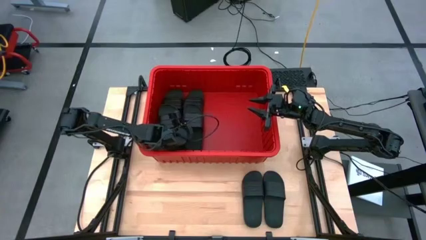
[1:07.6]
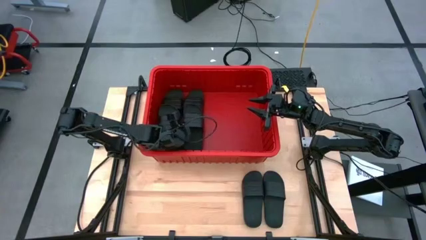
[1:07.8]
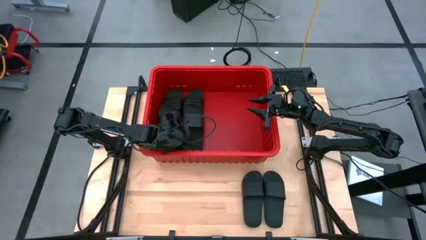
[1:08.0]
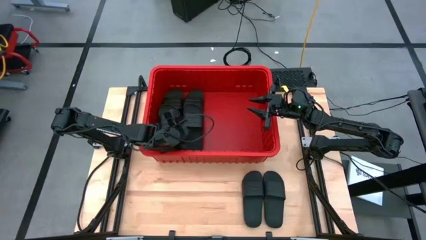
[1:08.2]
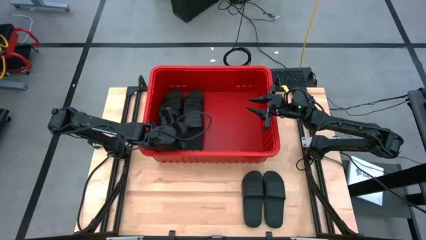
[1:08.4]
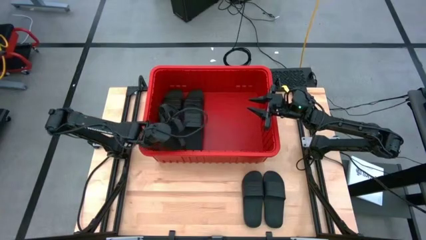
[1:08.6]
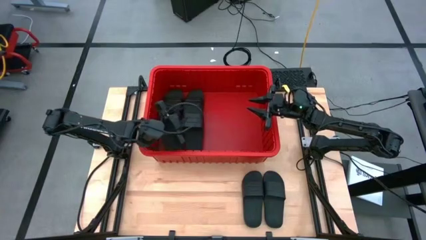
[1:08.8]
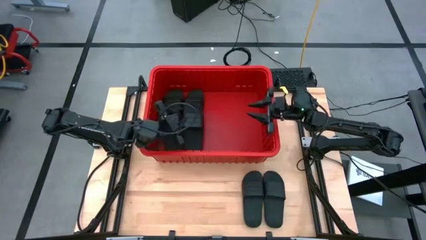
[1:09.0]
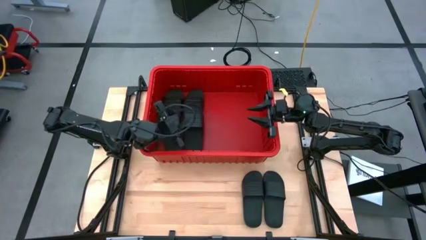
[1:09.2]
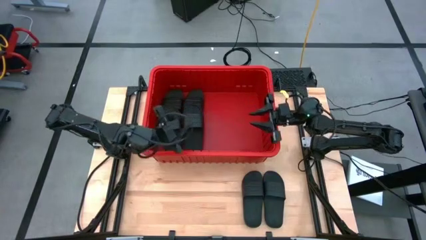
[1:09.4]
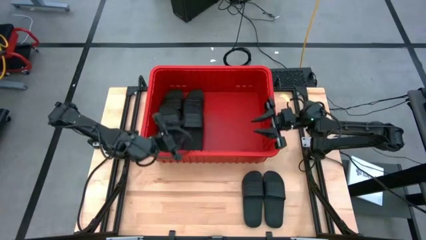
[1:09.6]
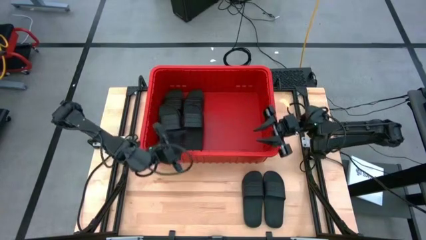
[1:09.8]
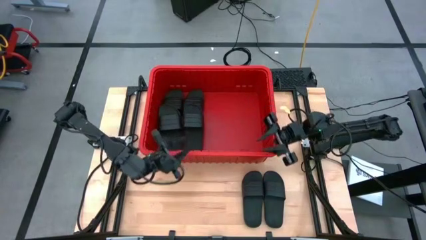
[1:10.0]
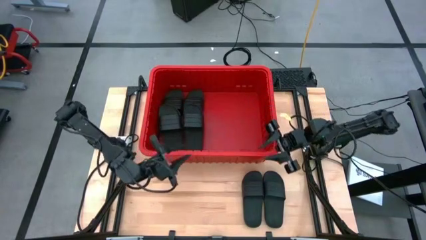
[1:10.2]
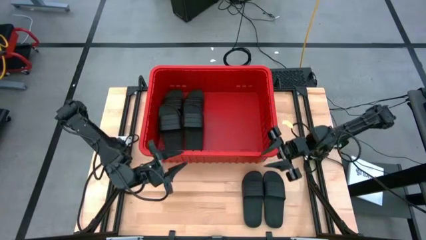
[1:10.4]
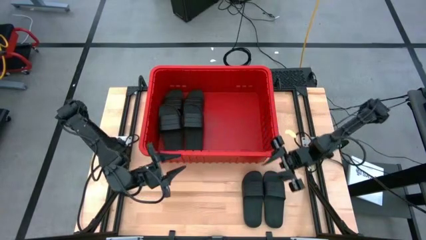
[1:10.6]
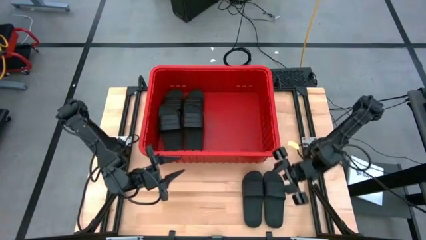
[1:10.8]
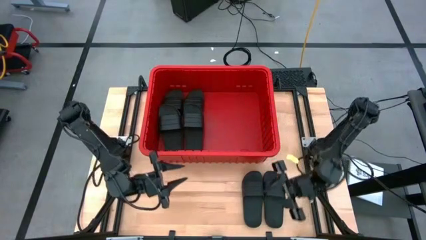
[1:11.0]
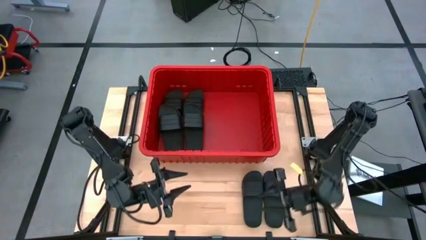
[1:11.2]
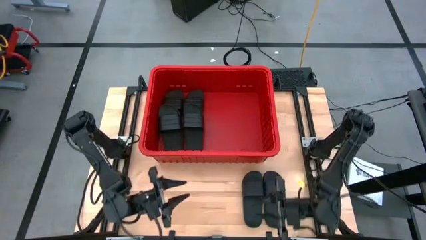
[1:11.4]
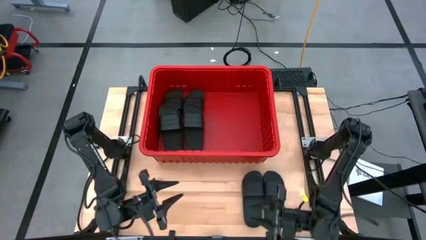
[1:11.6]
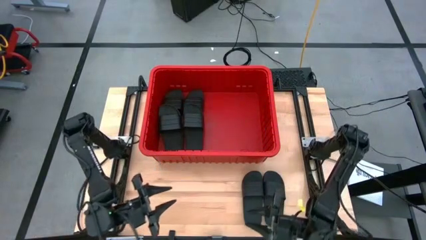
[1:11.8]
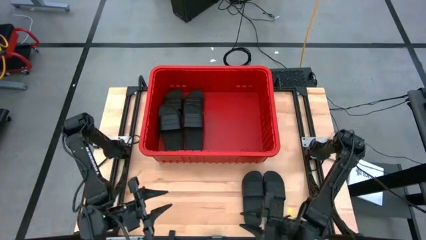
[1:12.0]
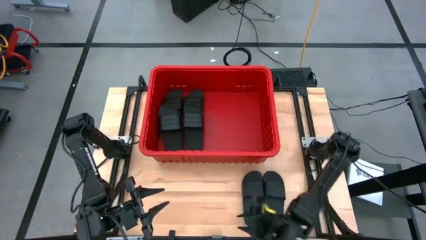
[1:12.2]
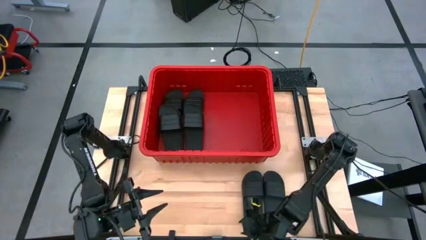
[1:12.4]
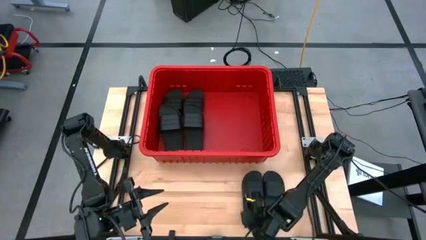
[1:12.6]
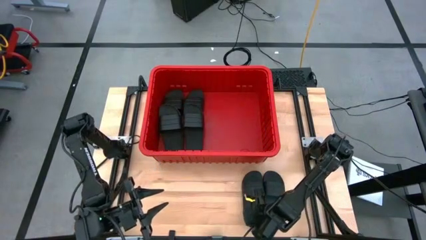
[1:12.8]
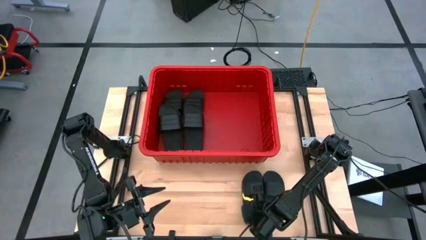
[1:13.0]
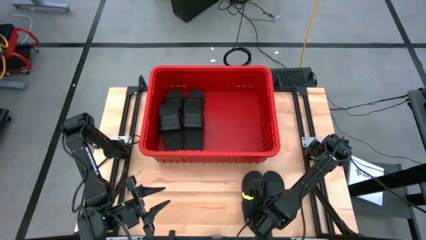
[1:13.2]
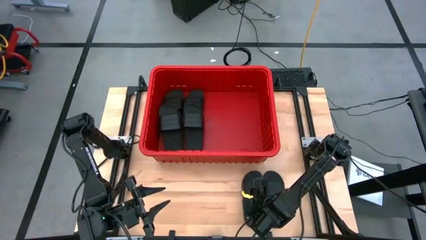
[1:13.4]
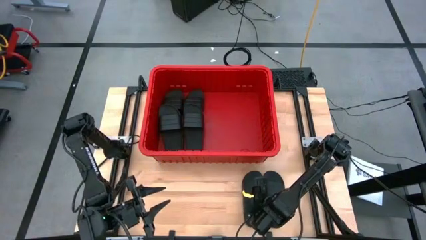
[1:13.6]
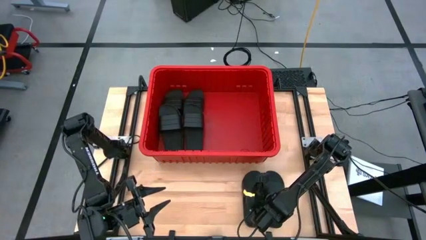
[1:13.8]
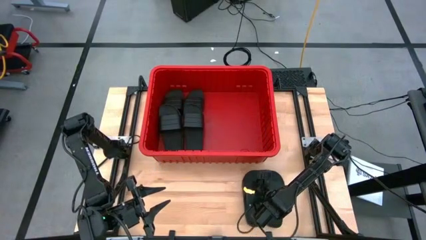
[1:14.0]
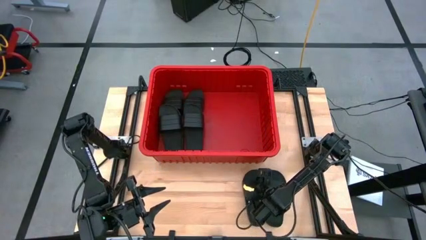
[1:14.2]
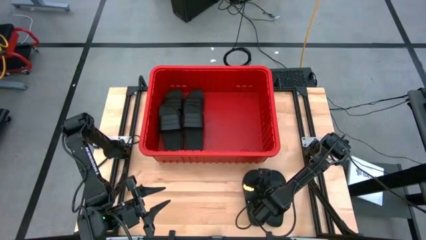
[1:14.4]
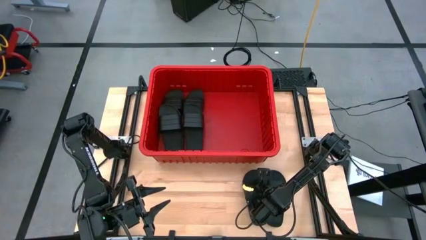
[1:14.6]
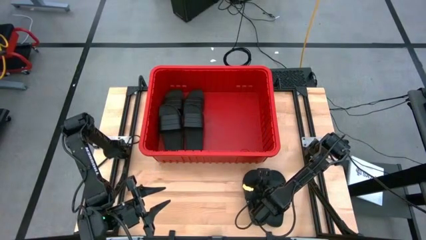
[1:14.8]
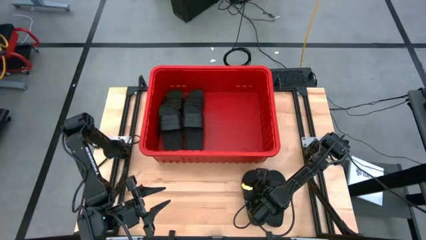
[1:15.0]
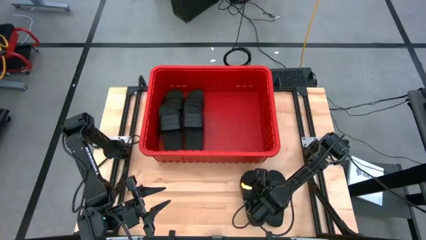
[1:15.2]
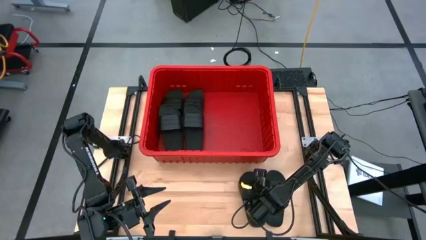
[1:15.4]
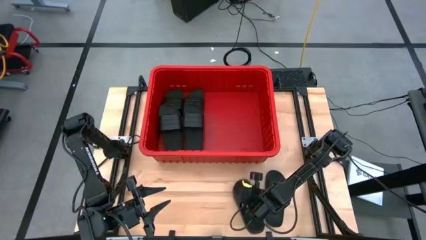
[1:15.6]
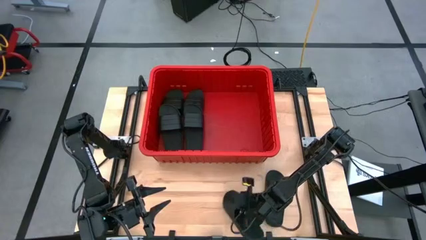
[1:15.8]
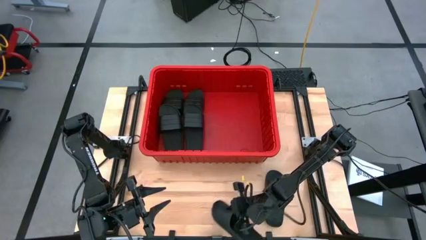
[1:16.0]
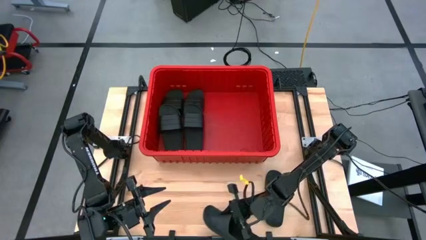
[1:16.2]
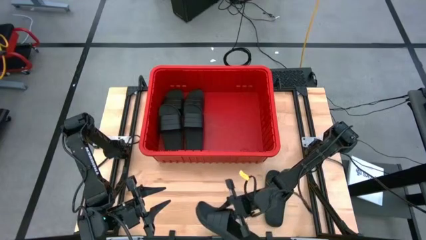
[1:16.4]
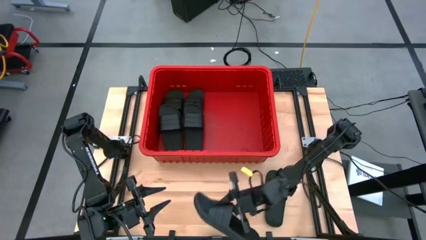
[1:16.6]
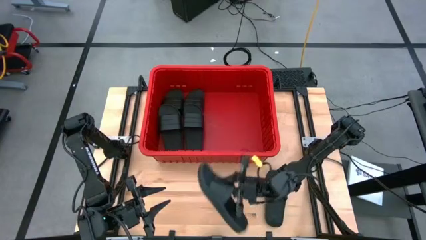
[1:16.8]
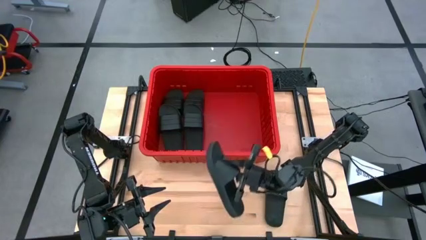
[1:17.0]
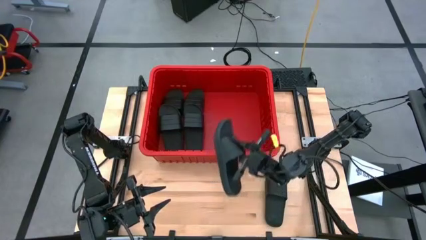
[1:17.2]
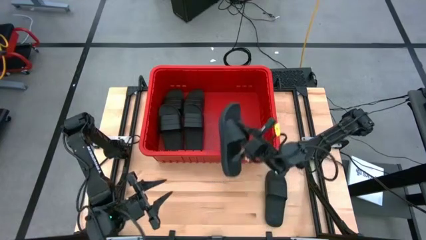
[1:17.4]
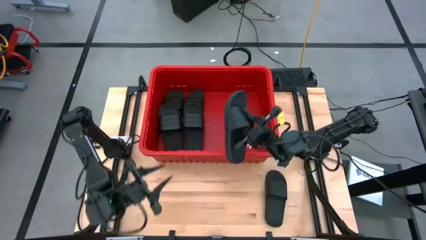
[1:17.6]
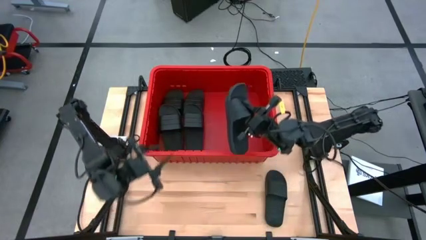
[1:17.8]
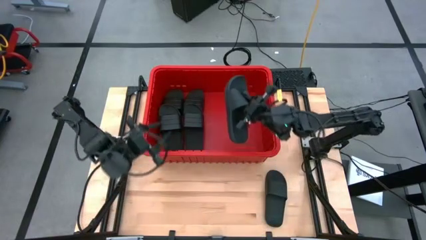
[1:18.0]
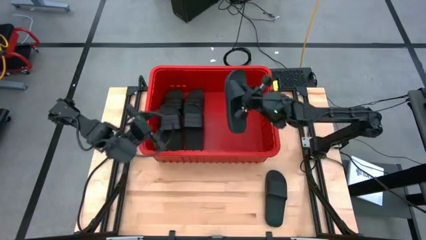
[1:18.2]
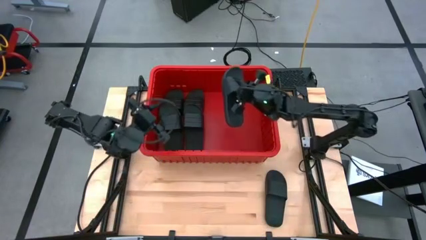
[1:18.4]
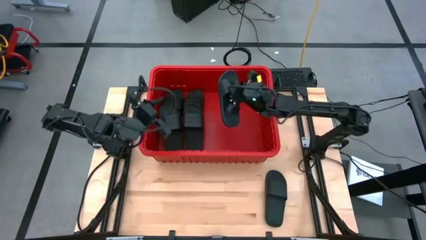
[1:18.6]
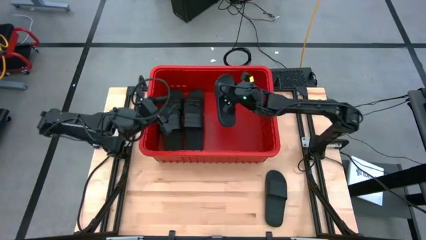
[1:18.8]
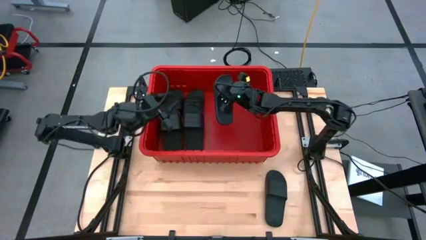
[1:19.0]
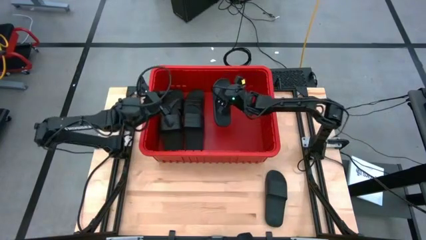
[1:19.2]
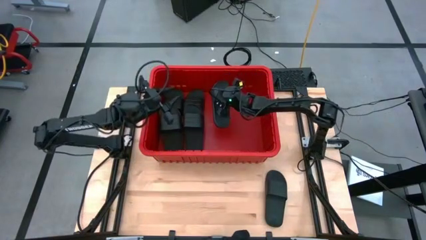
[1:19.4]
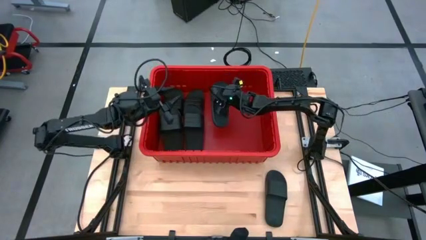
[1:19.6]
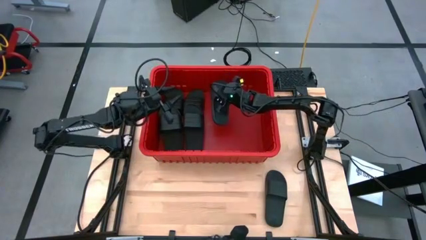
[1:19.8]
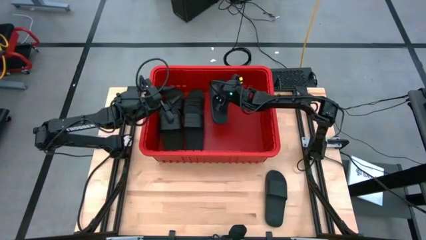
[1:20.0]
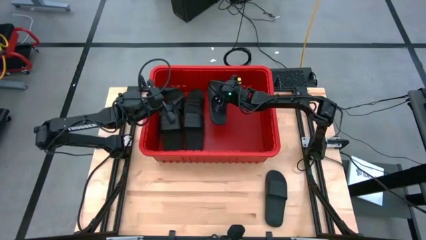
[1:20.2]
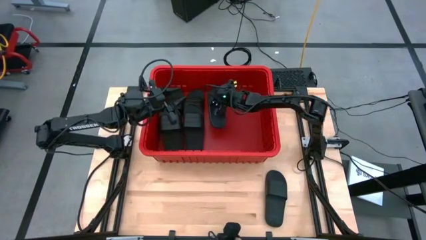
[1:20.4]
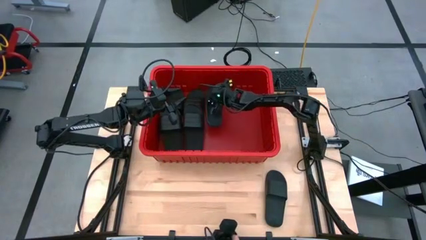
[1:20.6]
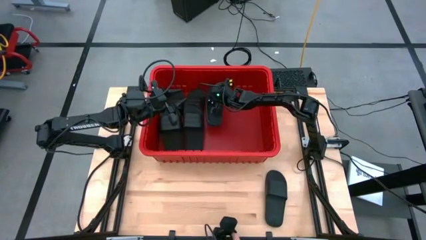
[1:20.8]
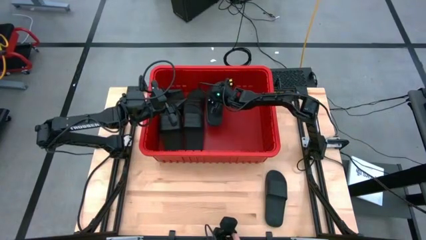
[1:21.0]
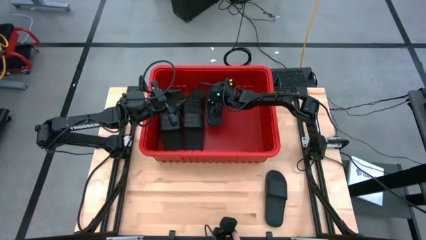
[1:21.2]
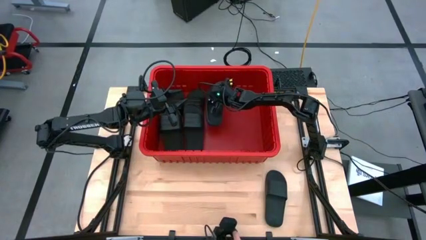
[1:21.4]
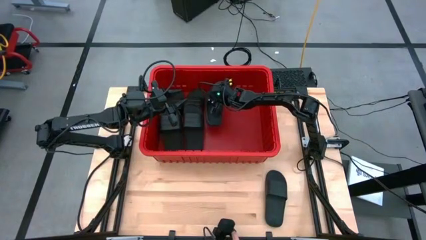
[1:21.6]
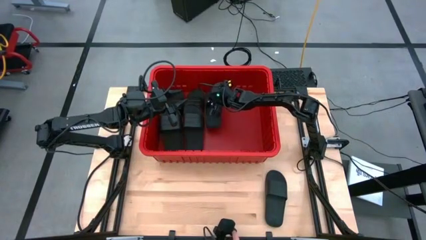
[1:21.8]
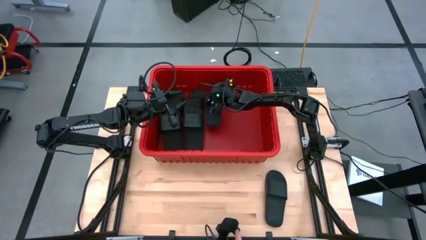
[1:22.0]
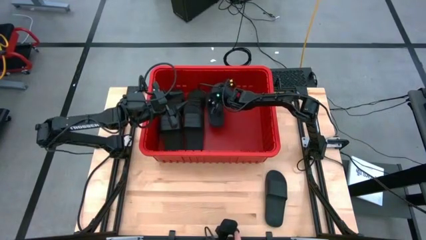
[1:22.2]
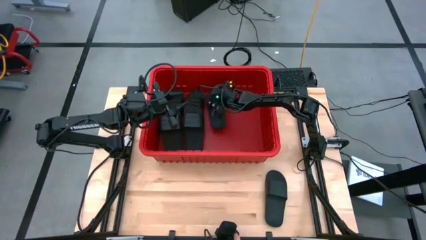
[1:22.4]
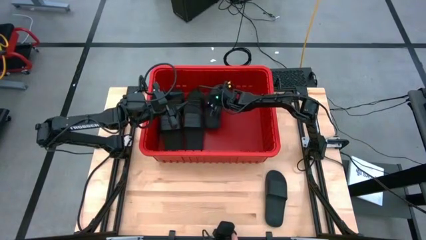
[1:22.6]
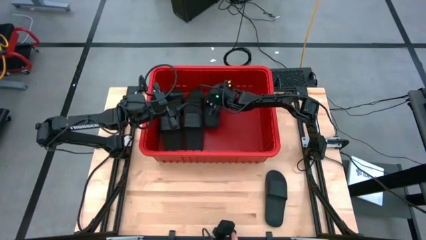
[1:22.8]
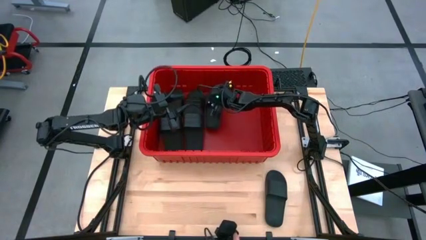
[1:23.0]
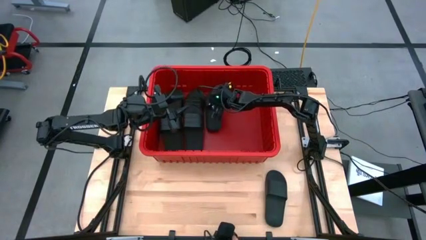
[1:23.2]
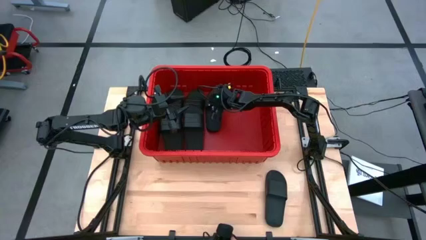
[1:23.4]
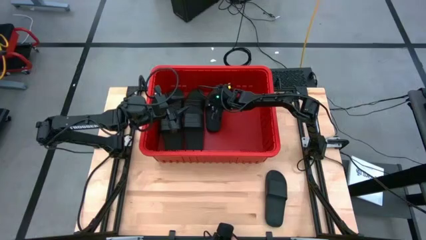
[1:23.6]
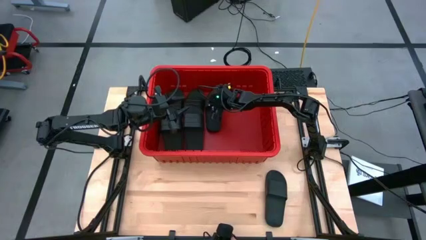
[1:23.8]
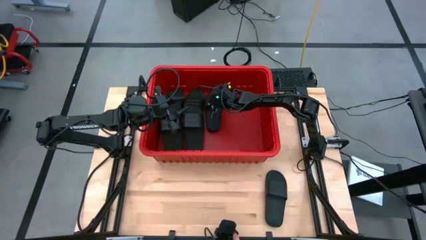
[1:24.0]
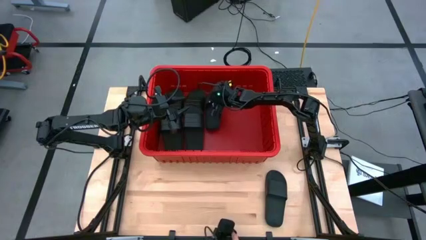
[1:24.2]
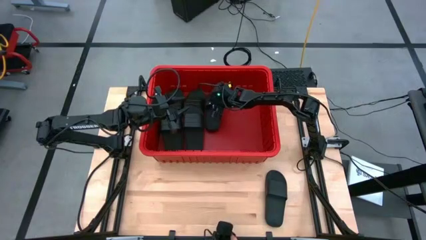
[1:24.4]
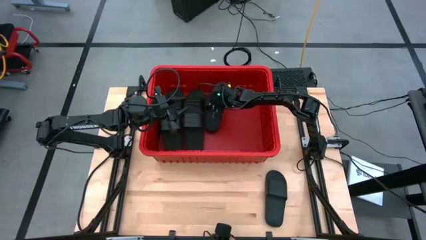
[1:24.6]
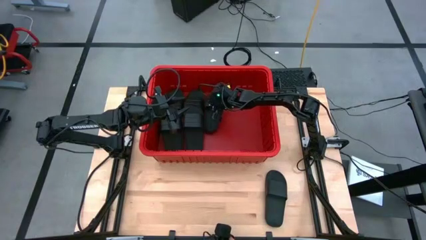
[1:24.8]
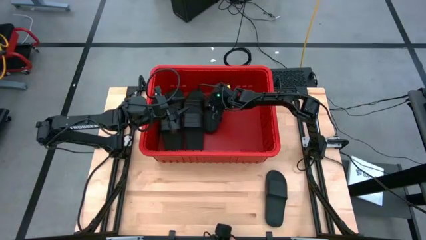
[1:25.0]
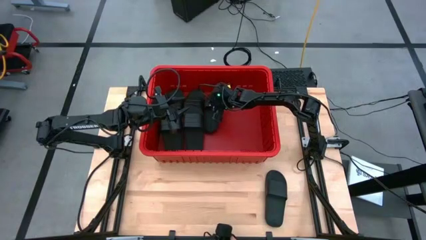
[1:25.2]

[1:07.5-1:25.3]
Task: Pick and place slides into bin
Put the left black slide into the red bin
